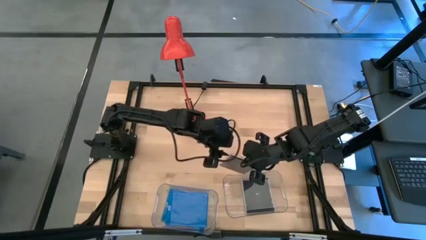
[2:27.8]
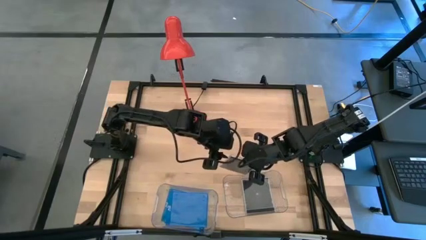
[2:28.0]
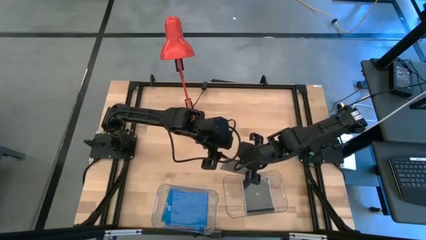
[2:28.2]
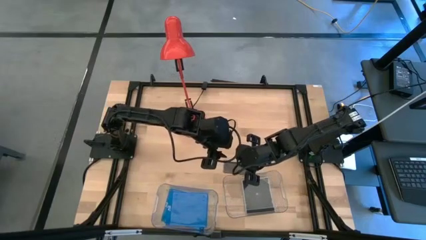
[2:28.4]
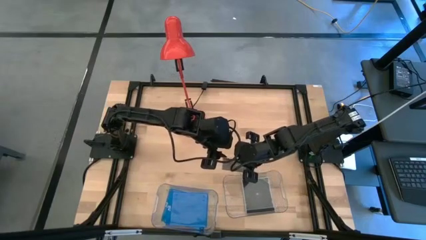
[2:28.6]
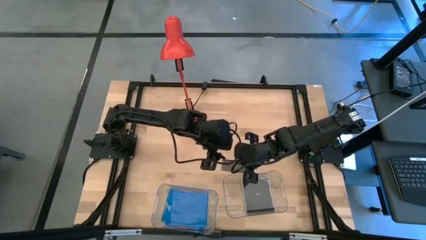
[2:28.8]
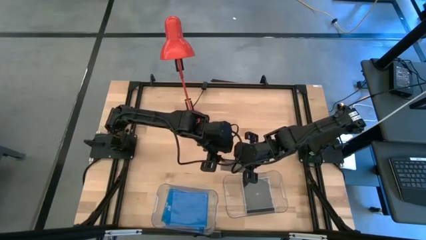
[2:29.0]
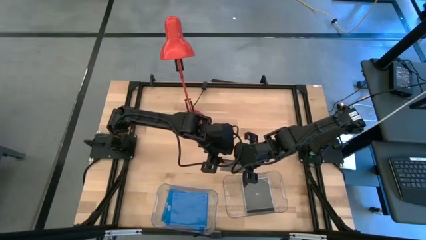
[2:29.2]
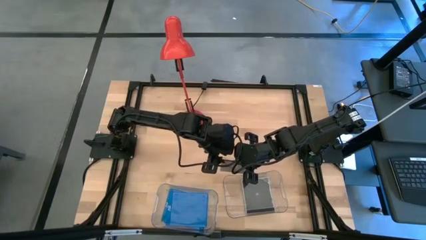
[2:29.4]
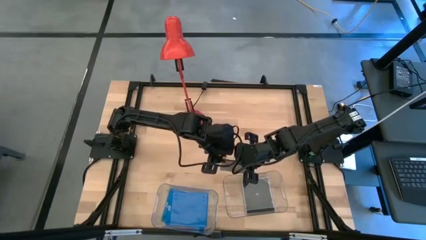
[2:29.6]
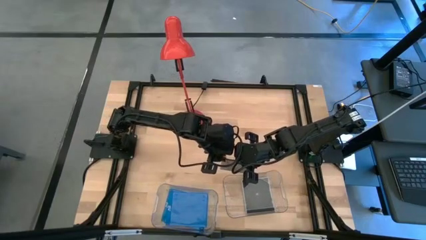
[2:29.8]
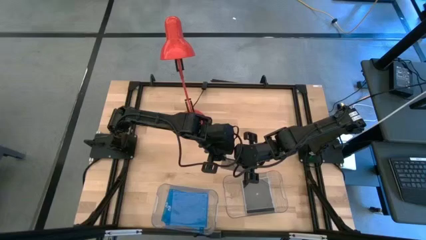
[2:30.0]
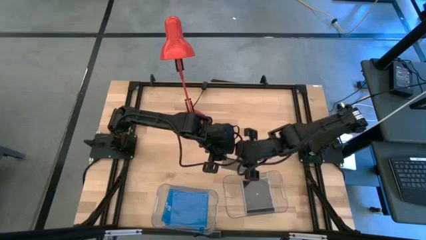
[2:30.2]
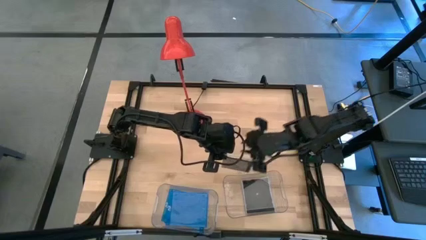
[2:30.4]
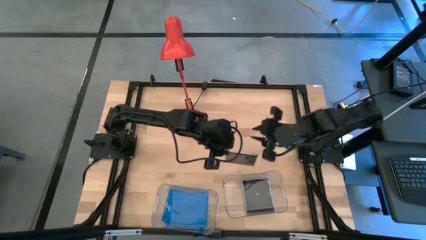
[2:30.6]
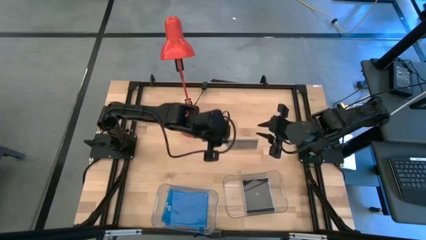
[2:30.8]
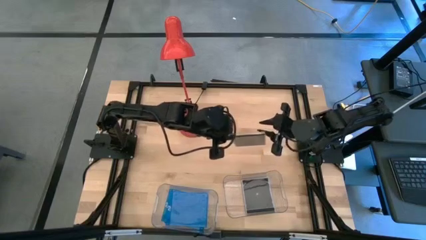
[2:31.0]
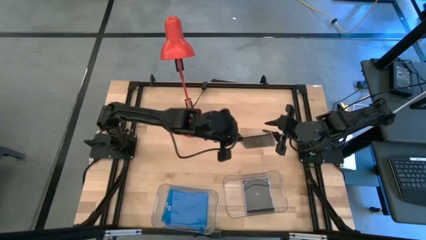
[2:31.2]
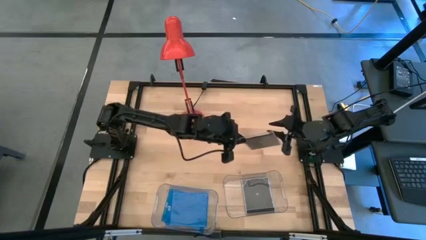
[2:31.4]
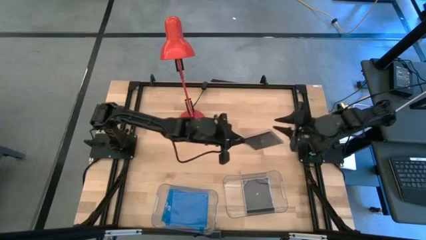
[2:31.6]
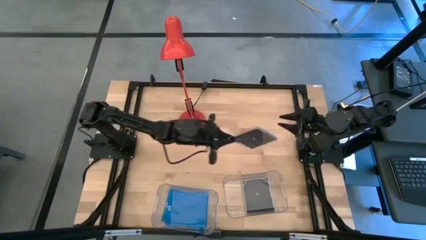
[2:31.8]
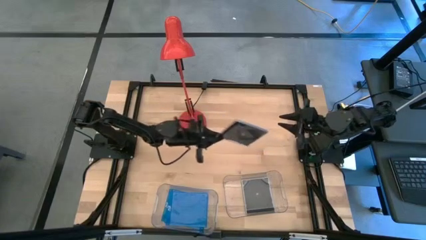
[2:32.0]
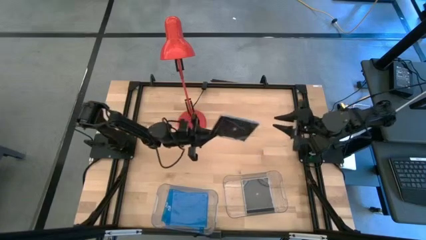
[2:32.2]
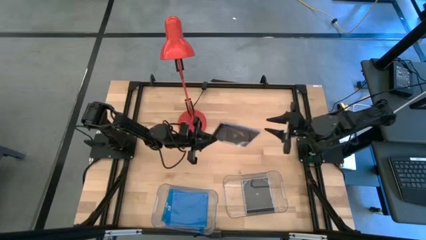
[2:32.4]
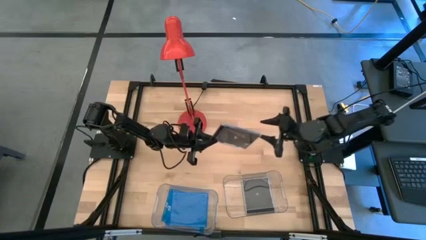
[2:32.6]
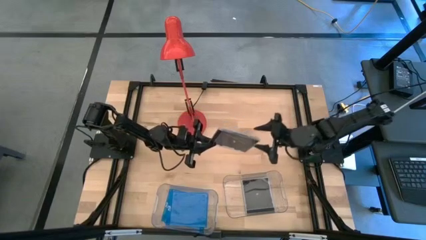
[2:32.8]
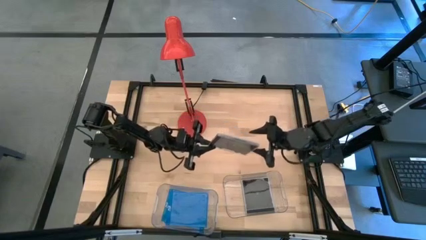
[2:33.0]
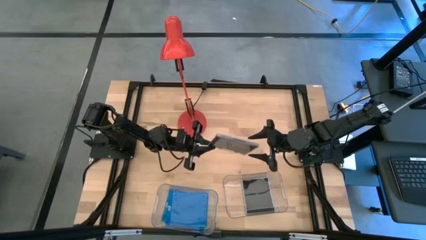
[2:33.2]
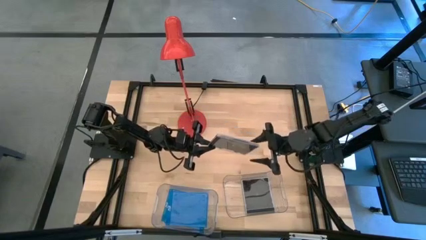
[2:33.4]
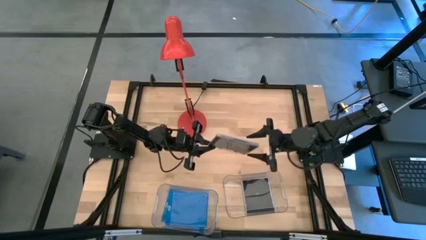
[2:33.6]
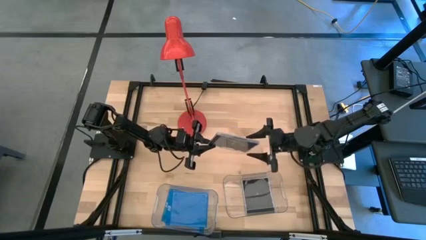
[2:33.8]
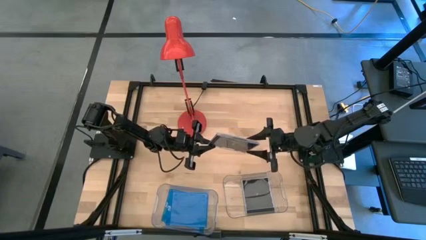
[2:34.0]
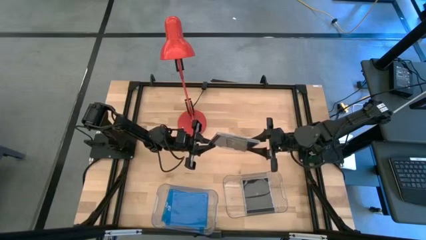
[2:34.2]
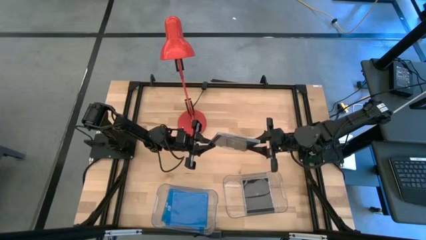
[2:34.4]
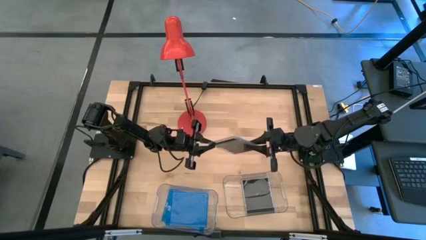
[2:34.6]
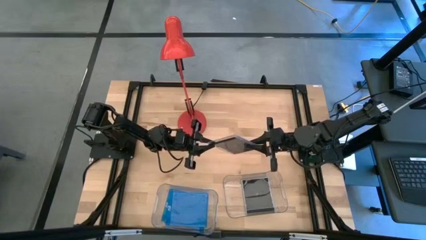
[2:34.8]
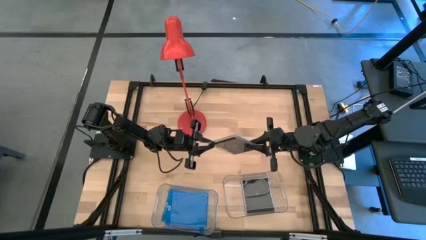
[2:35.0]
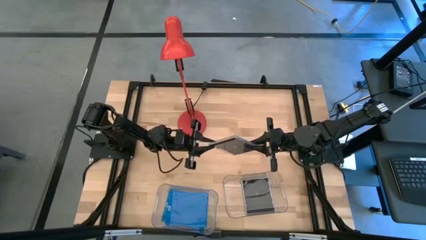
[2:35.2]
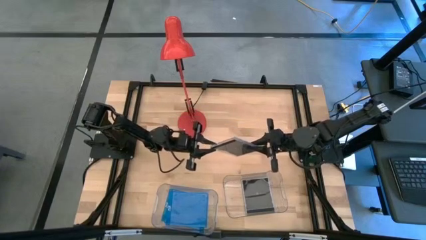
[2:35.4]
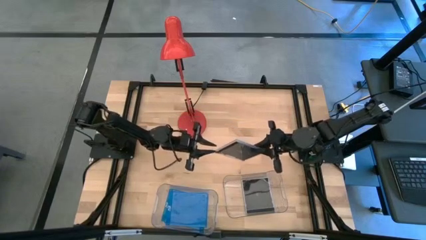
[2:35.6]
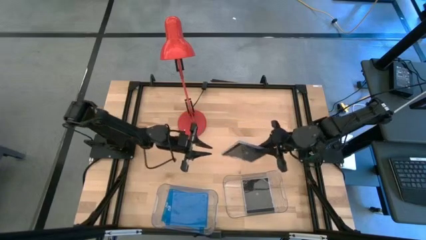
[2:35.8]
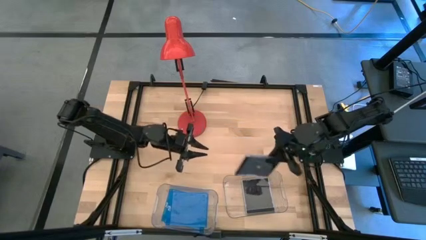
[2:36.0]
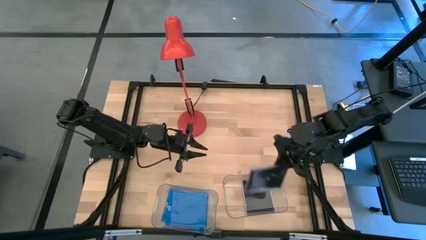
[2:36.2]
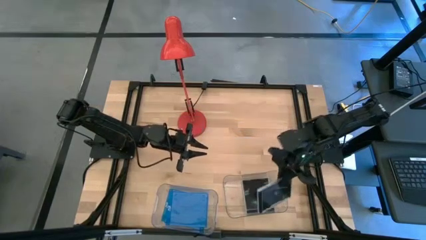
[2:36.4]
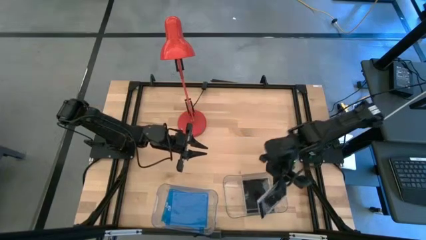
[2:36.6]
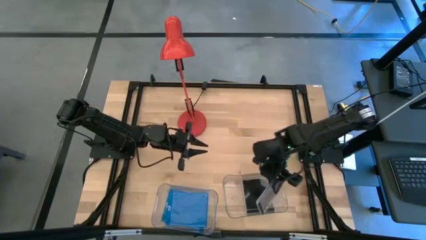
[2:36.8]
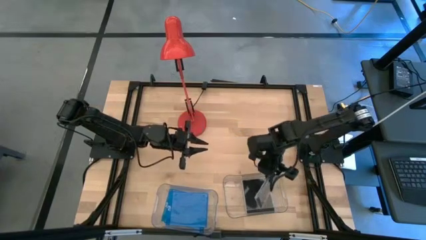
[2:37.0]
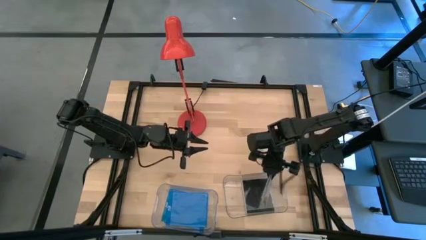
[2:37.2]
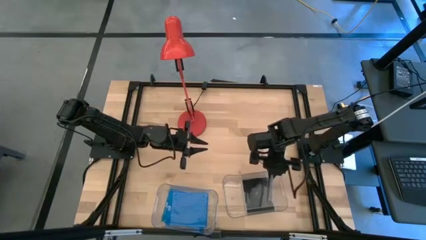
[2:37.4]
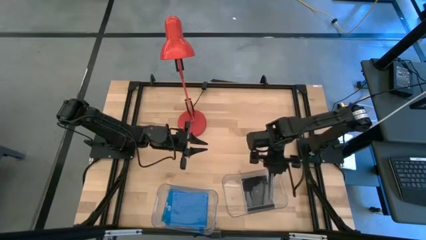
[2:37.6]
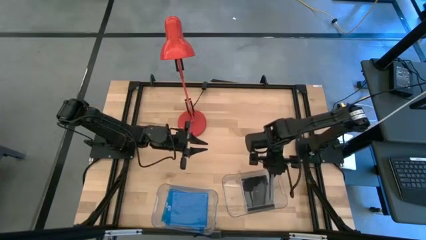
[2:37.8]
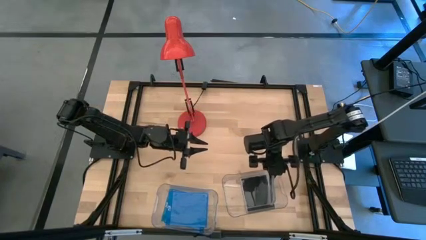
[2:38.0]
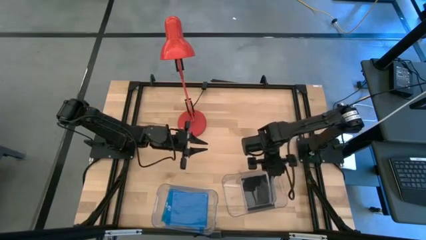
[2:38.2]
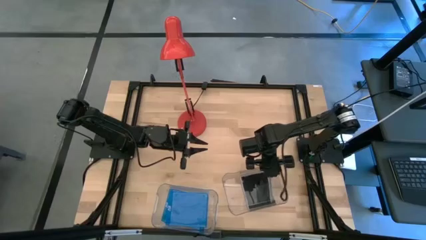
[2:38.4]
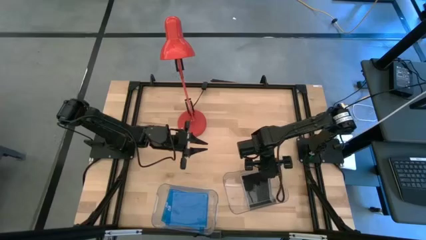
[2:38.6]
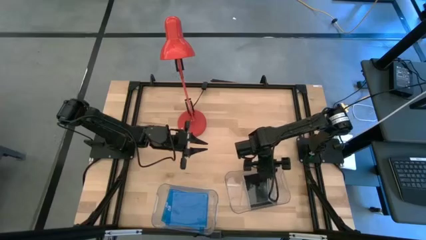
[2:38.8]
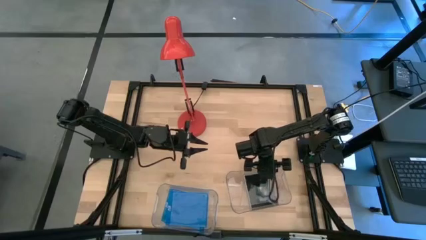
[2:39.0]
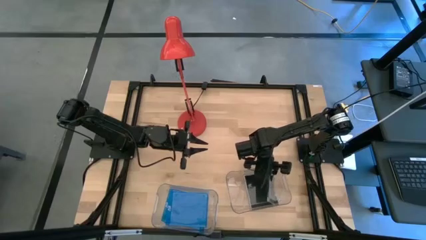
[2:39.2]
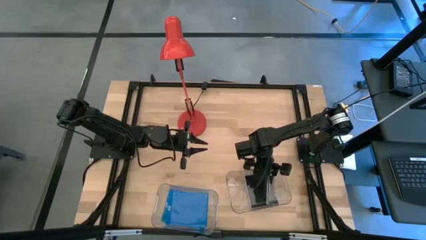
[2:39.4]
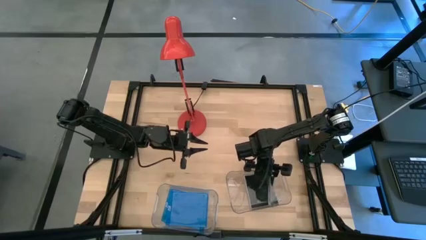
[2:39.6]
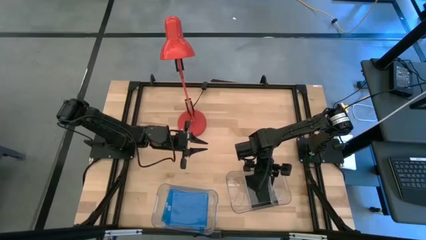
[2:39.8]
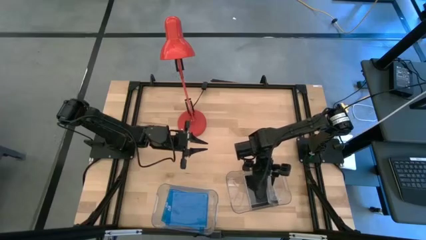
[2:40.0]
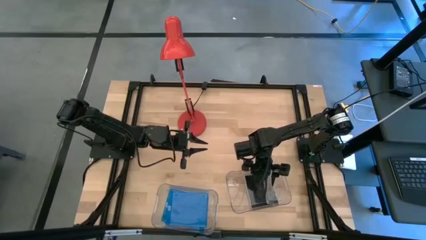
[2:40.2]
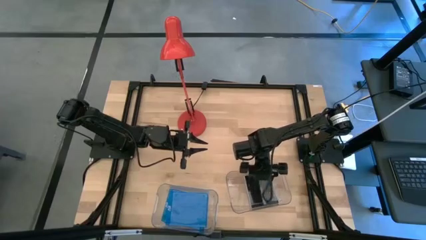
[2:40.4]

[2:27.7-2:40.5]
Task: Pick & place jewel cases by type
Put the black cd case into the right transparent bin

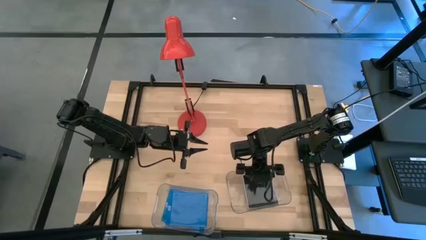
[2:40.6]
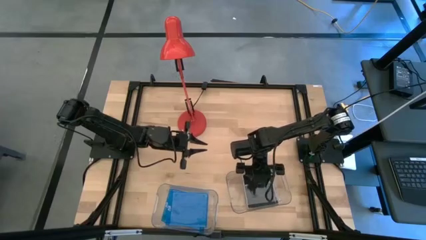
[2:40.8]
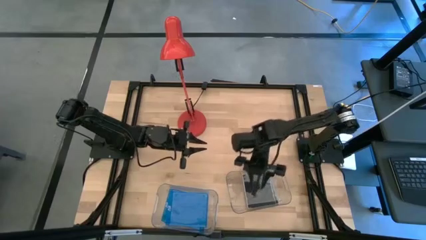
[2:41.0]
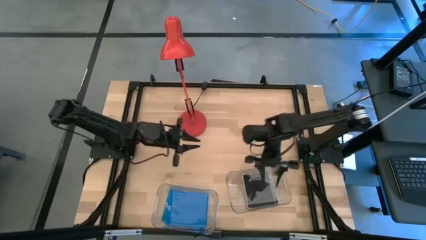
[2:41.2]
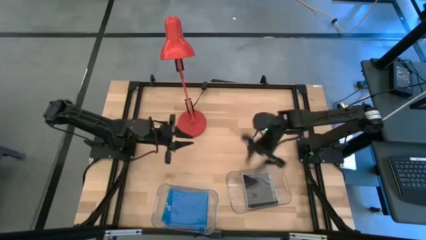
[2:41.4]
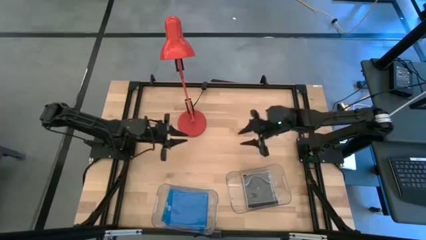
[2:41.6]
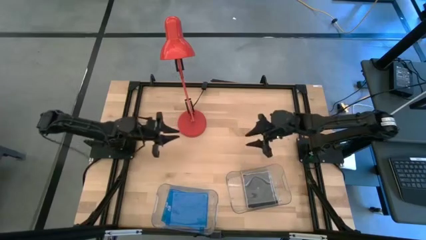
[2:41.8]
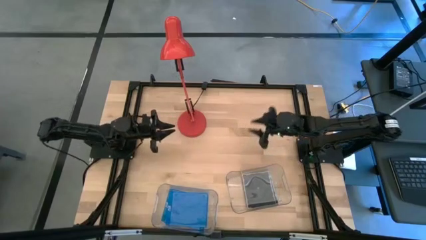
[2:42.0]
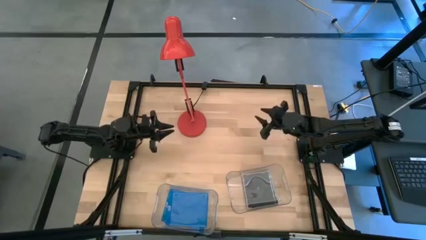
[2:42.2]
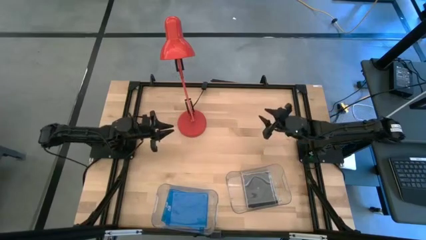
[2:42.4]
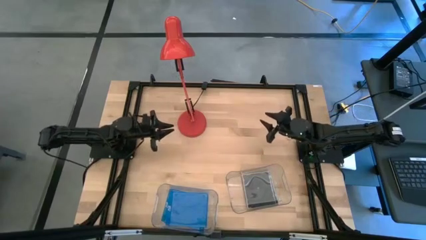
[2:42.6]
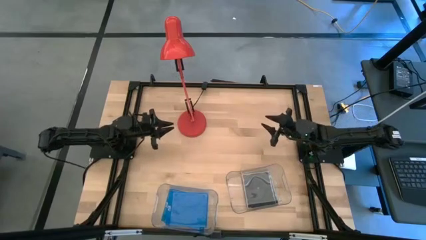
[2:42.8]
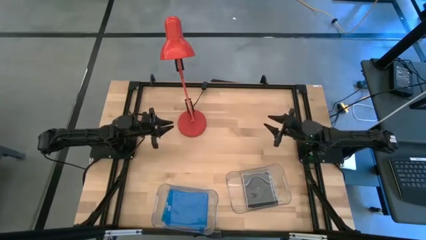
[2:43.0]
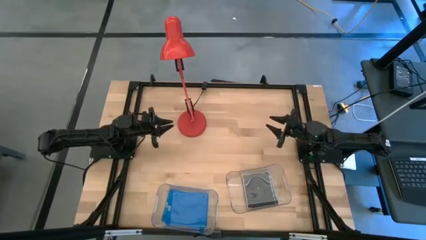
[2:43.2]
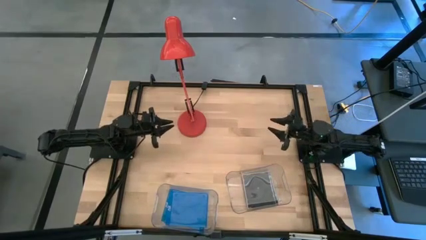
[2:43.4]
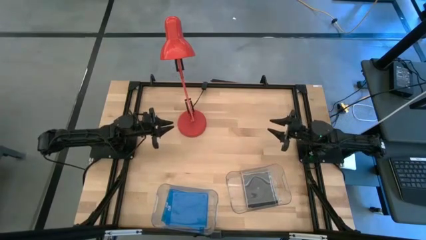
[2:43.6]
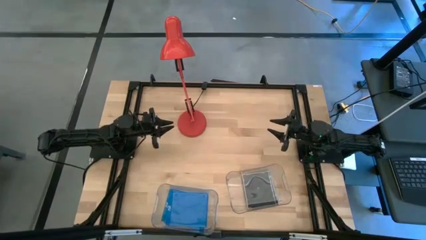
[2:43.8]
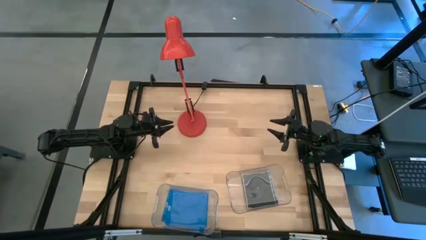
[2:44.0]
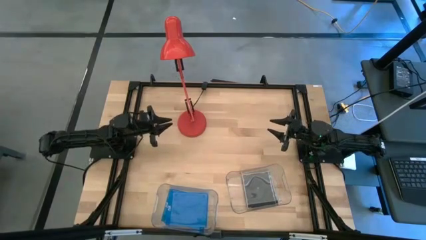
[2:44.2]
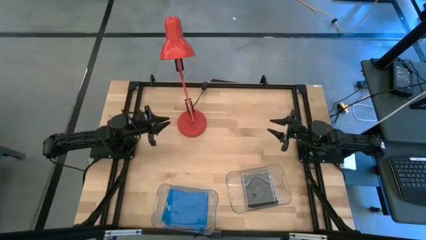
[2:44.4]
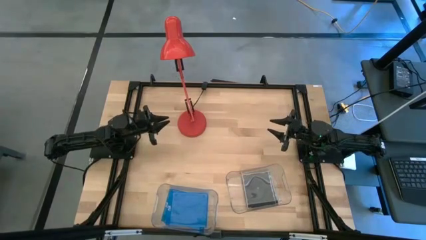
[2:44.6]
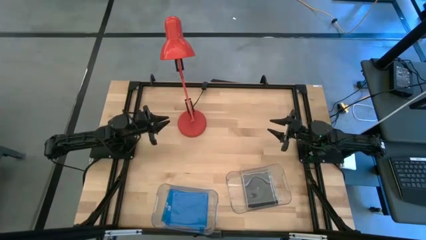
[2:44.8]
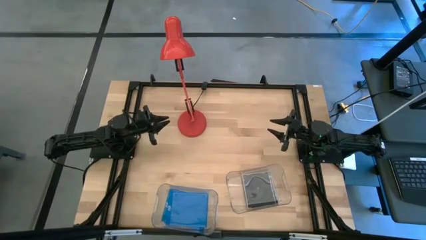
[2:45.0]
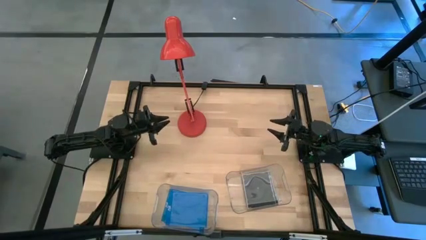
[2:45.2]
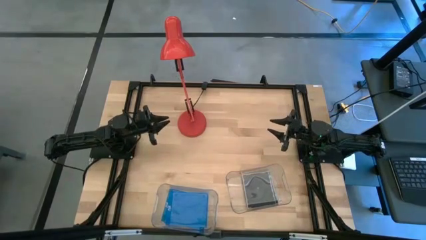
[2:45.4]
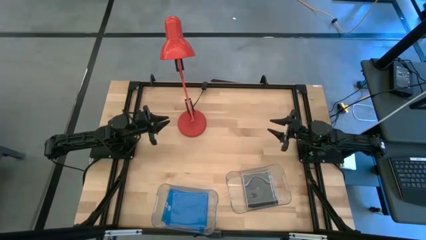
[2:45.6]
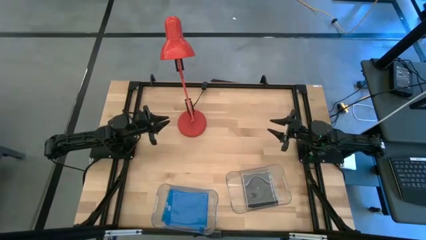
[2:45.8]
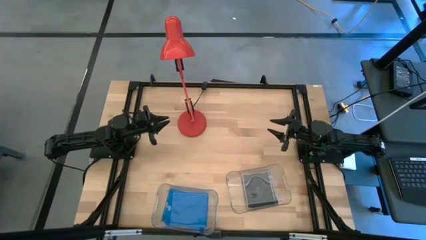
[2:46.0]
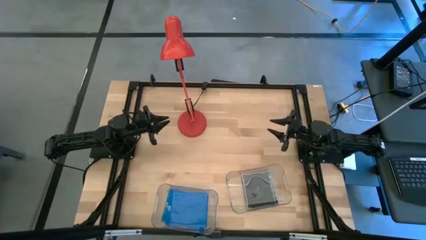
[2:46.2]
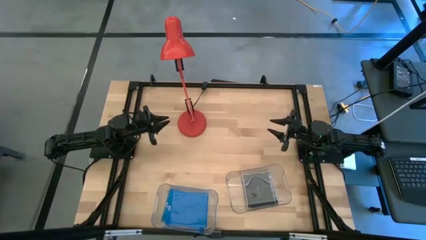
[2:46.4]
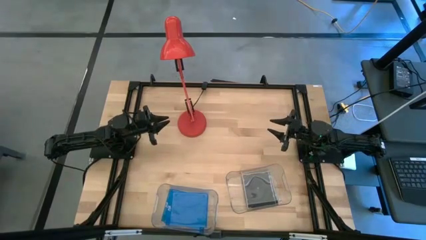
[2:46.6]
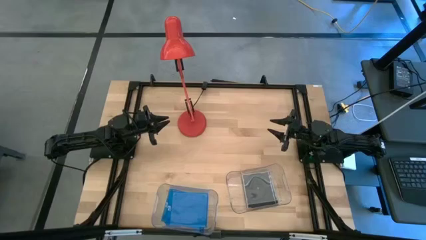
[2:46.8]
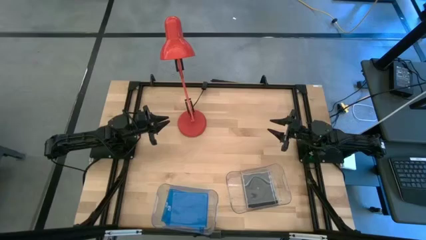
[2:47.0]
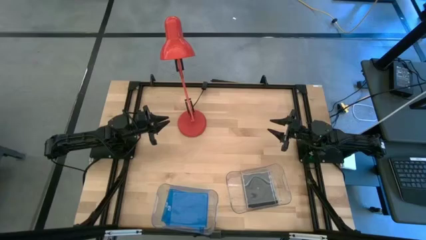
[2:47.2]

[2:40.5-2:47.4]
Return to Home Position
